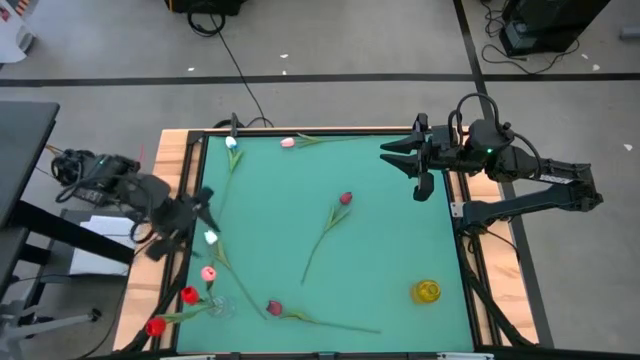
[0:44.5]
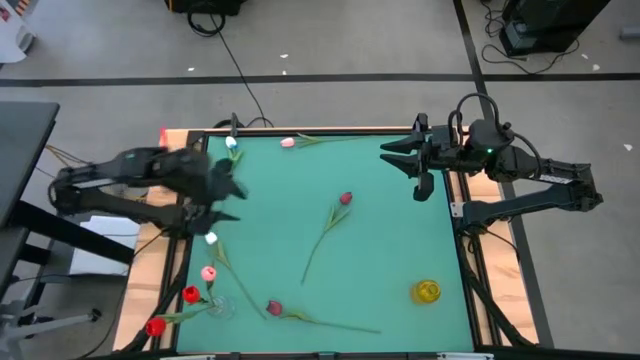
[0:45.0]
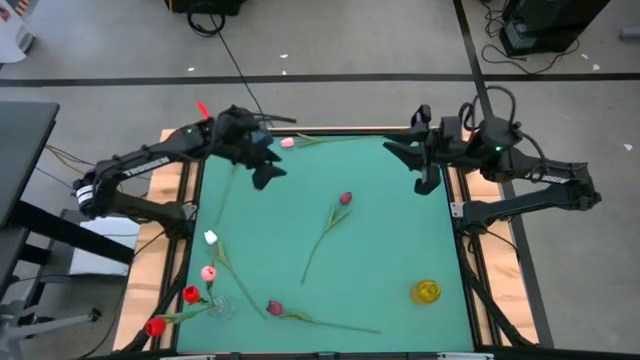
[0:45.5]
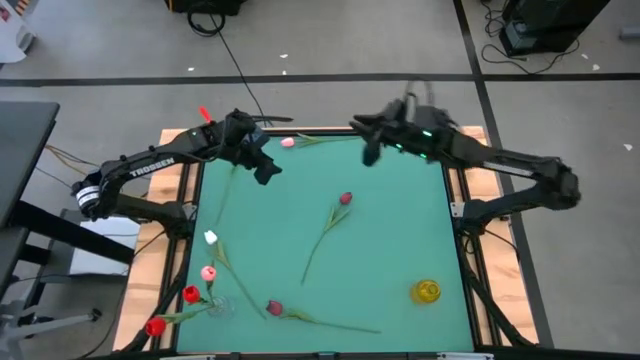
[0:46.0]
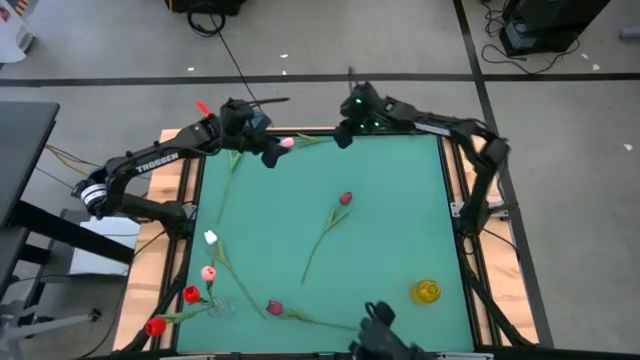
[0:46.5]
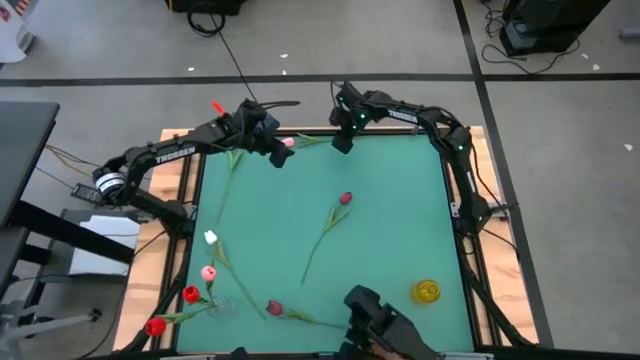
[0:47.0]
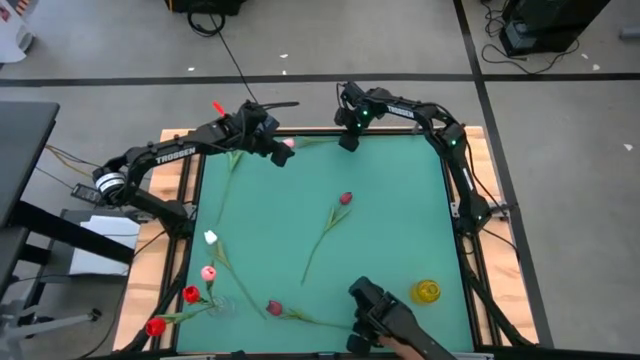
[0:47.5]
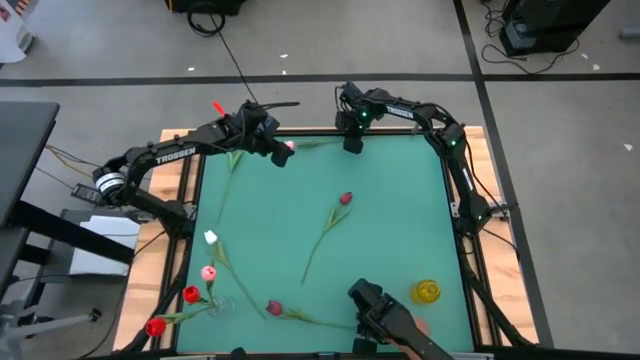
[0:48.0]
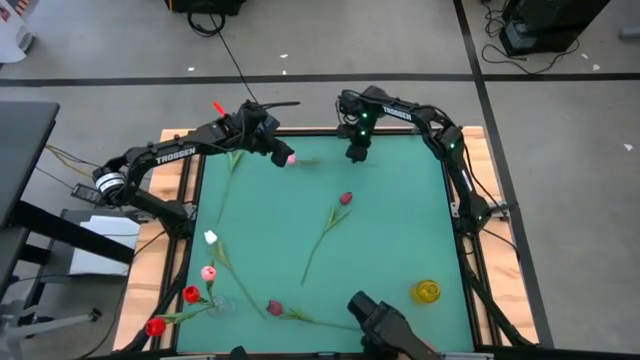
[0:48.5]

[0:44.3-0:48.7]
Task: Sort flowers into vase by color
Put the pink tulip into the white transparent vase

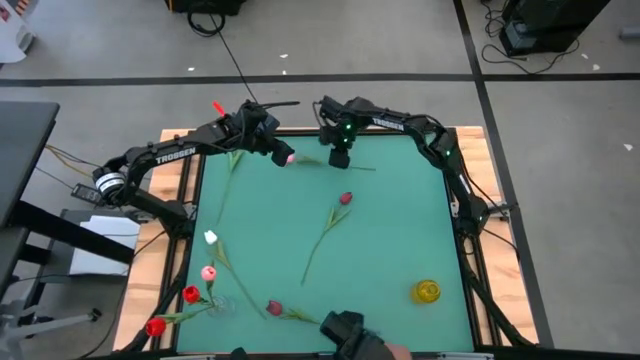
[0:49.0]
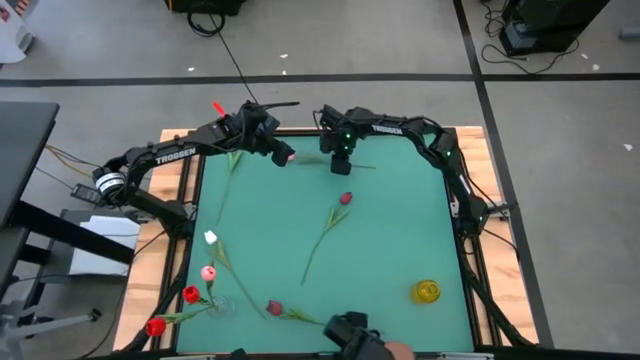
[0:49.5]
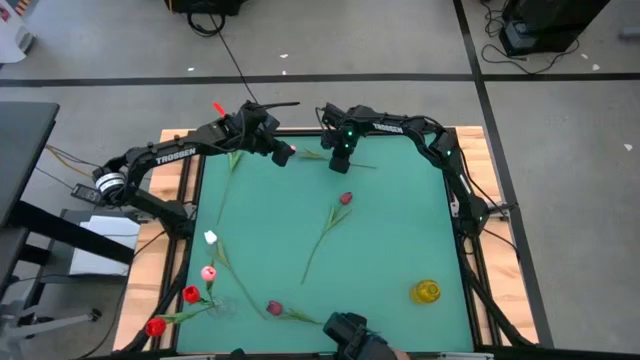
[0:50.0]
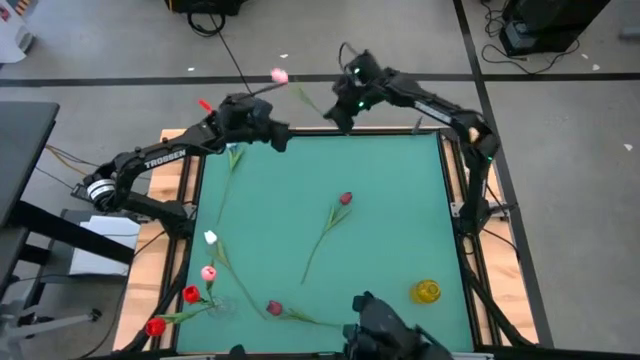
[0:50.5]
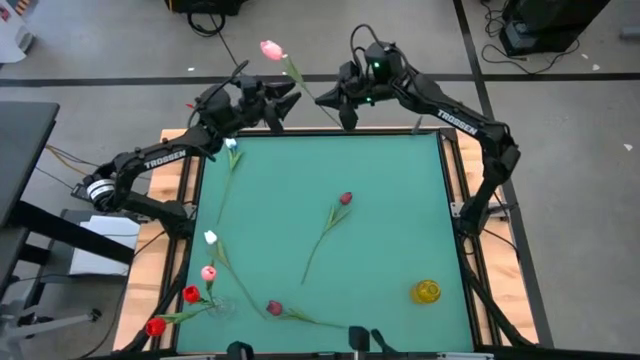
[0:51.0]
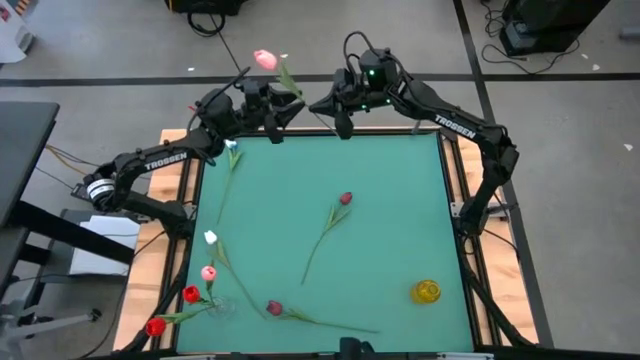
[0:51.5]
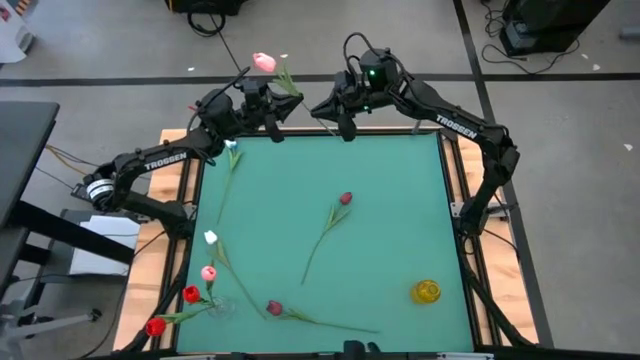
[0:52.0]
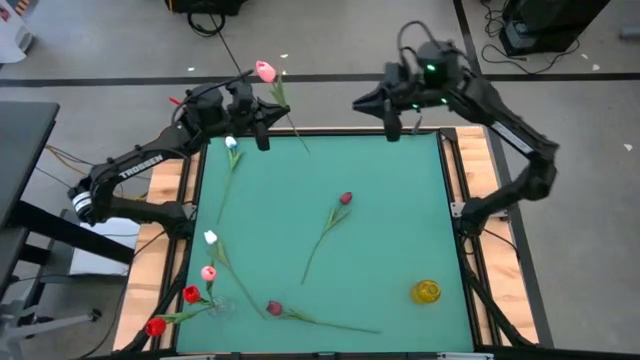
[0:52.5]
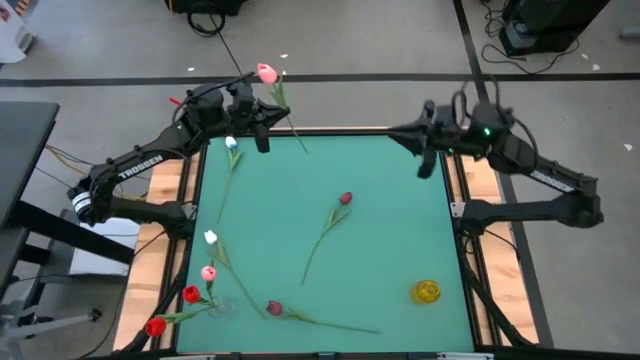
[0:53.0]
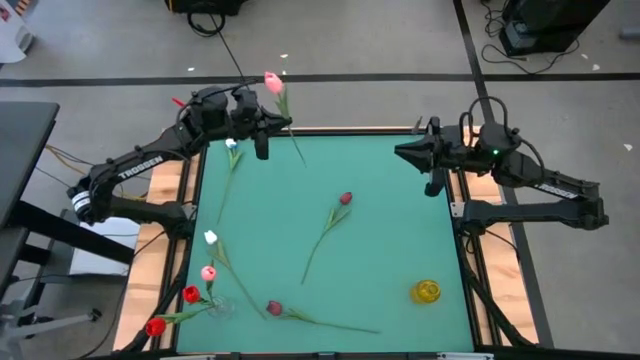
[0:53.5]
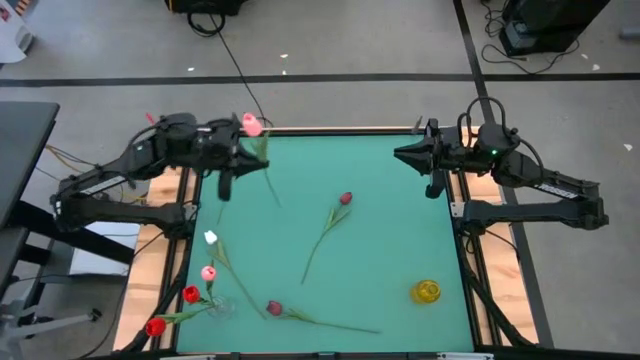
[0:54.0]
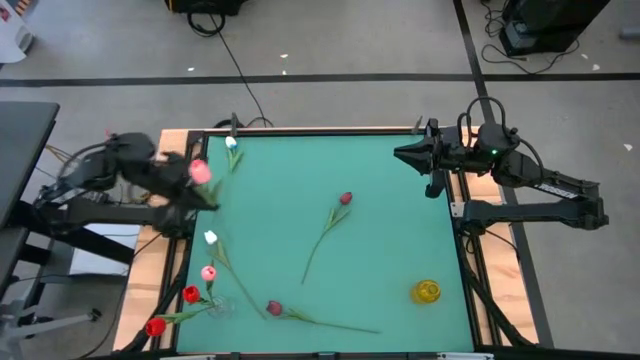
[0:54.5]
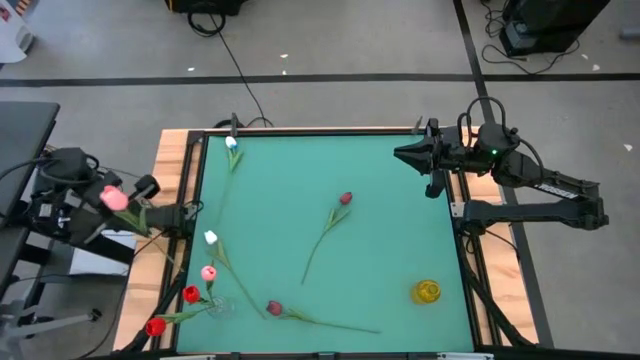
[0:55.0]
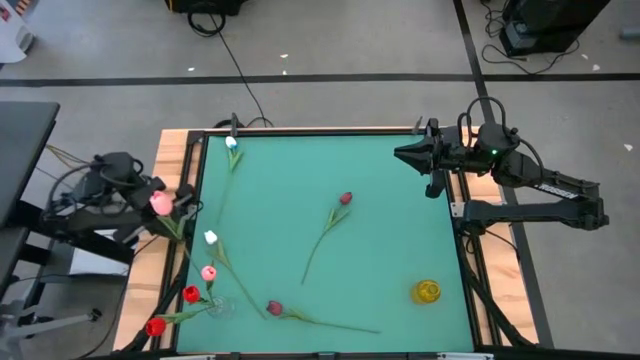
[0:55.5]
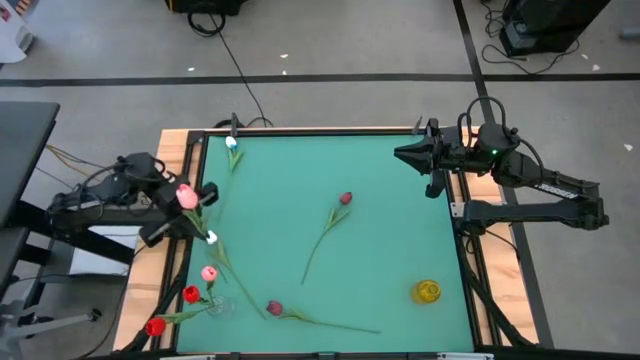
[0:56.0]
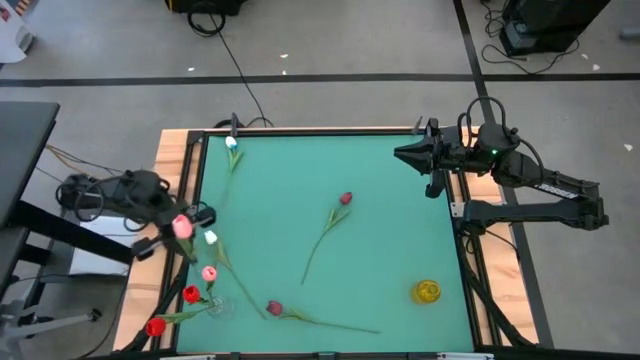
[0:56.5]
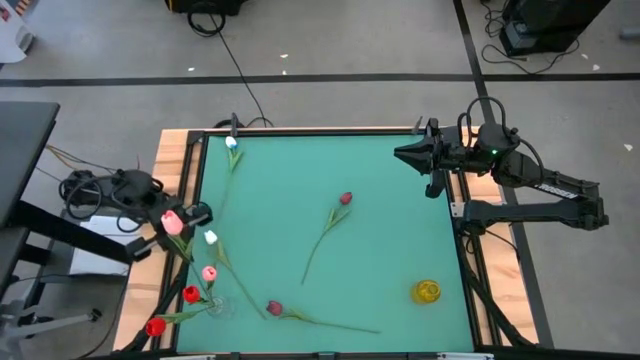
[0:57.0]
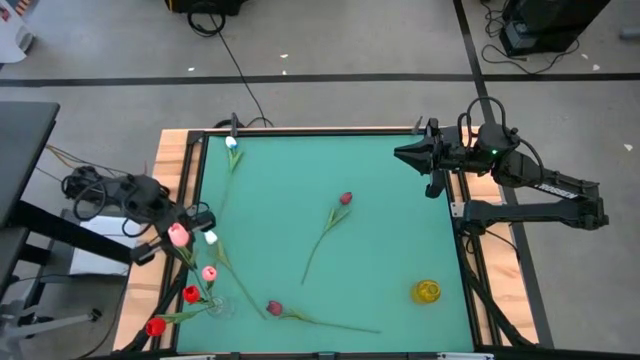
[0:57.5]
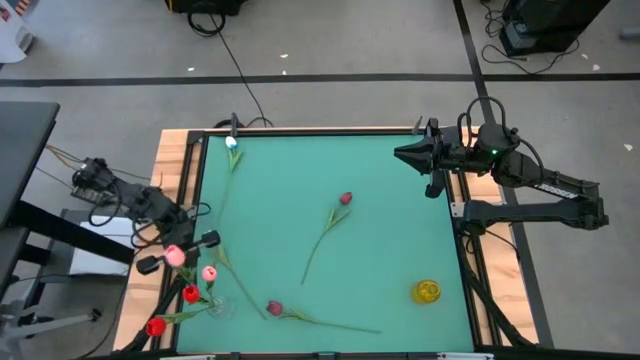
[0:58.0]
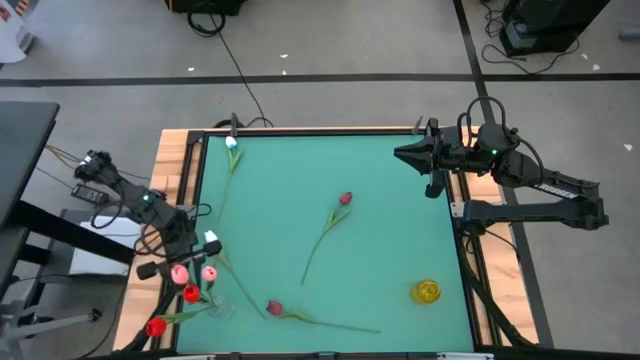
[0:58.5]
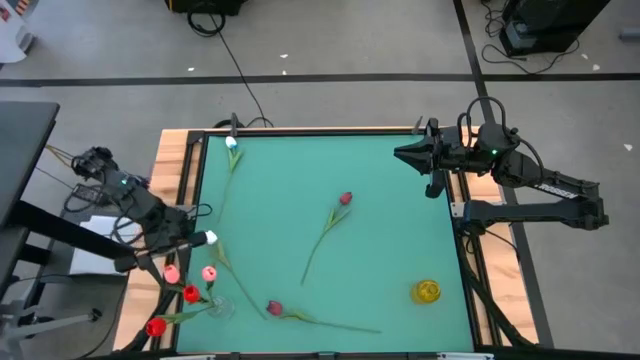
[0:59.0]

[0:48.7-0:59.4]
Put the pink tulip into the white transparent vase

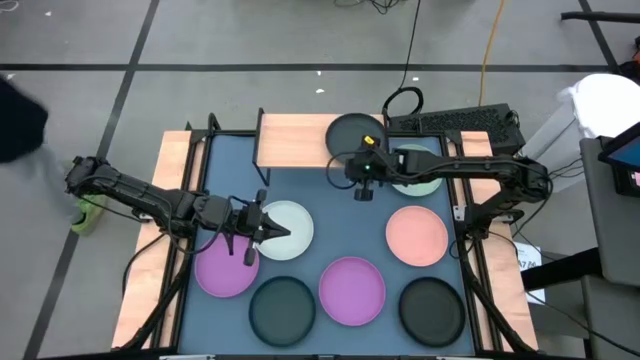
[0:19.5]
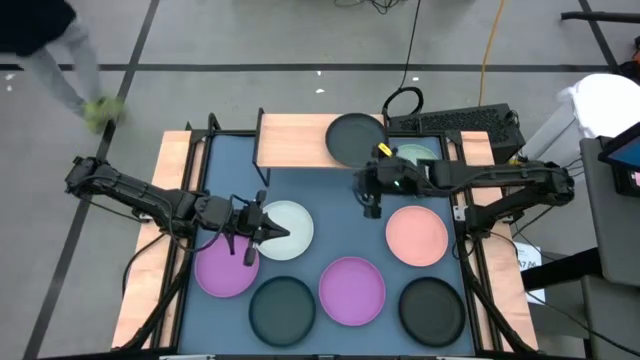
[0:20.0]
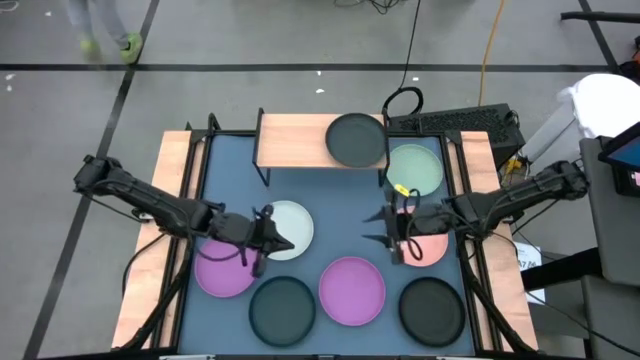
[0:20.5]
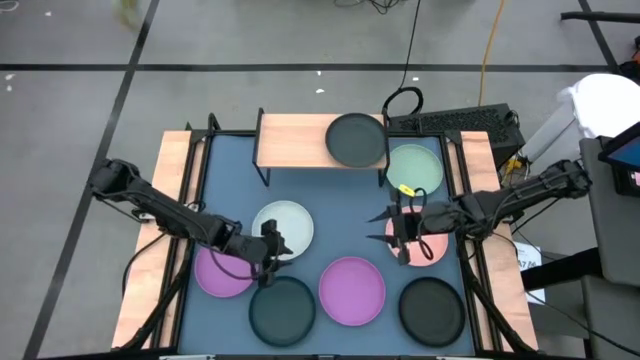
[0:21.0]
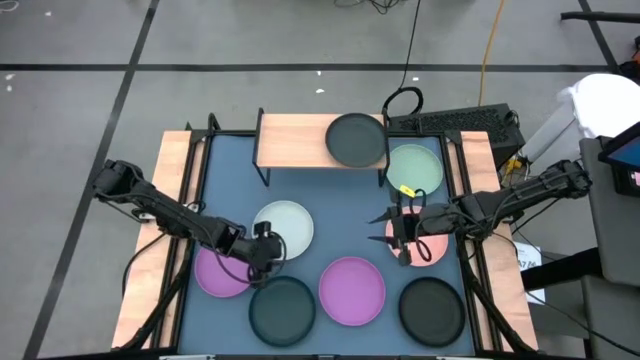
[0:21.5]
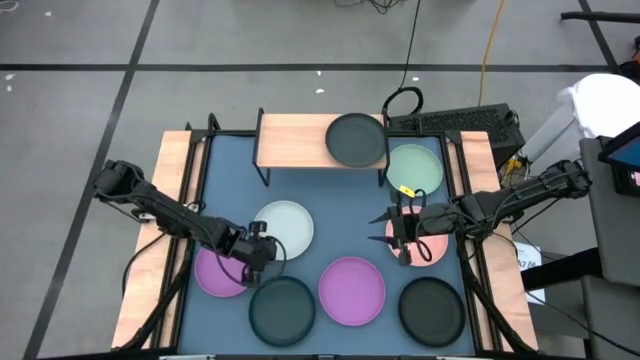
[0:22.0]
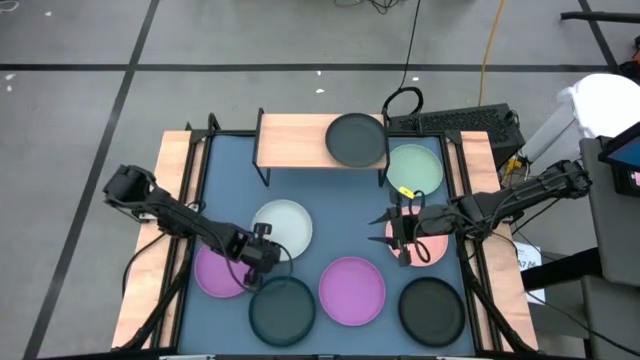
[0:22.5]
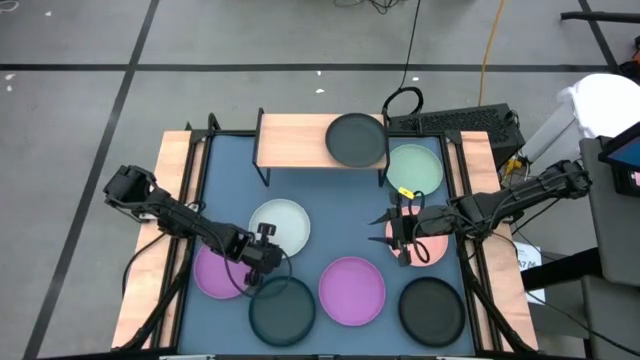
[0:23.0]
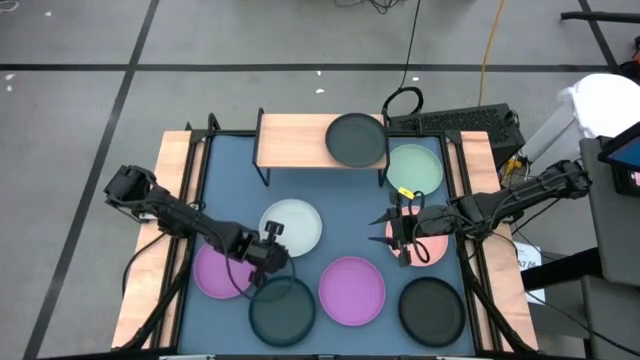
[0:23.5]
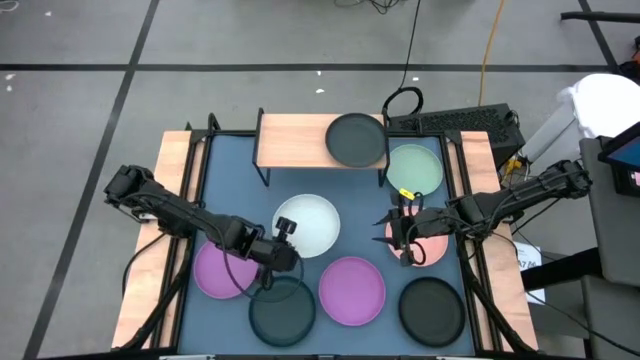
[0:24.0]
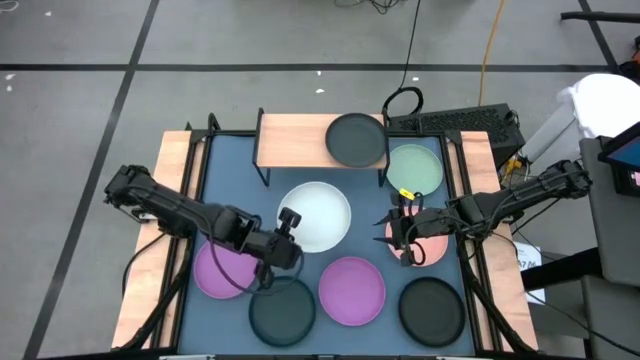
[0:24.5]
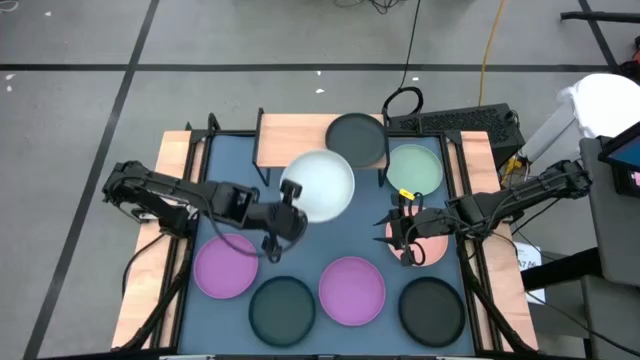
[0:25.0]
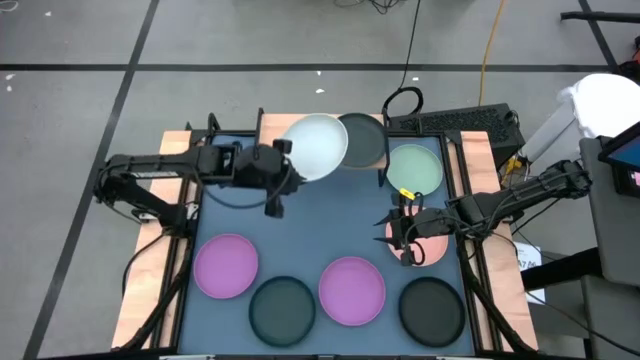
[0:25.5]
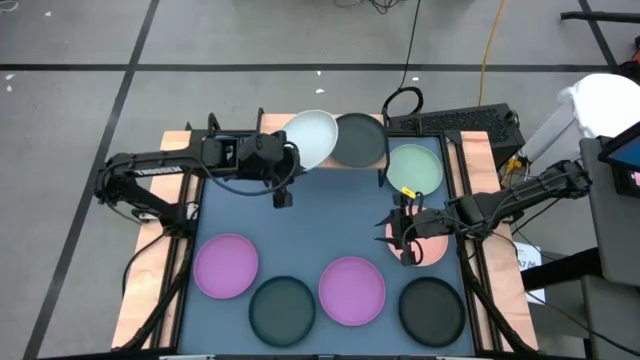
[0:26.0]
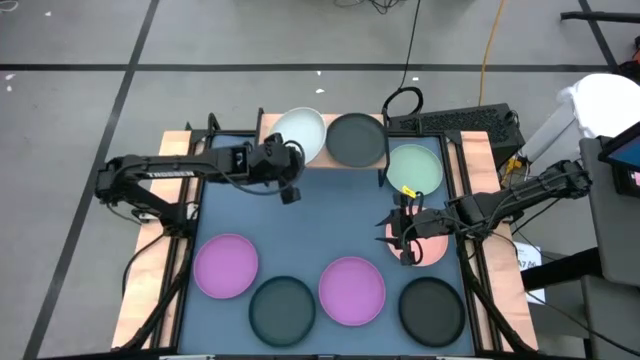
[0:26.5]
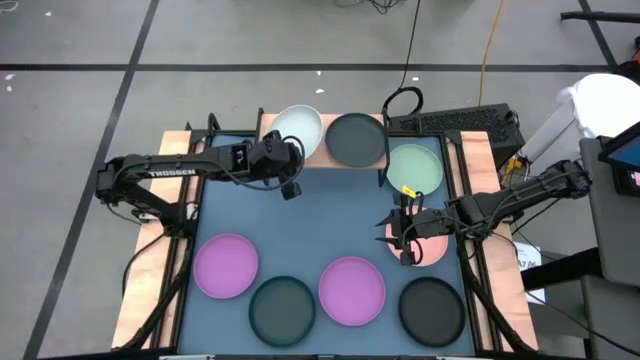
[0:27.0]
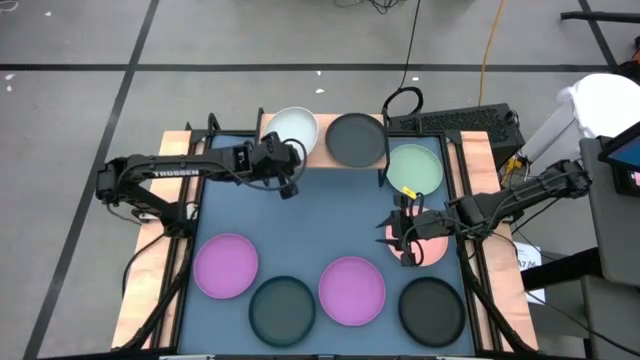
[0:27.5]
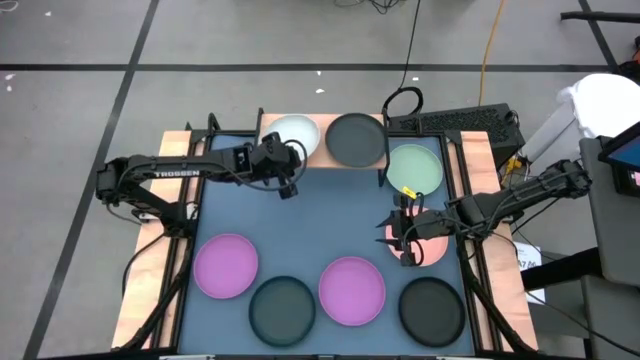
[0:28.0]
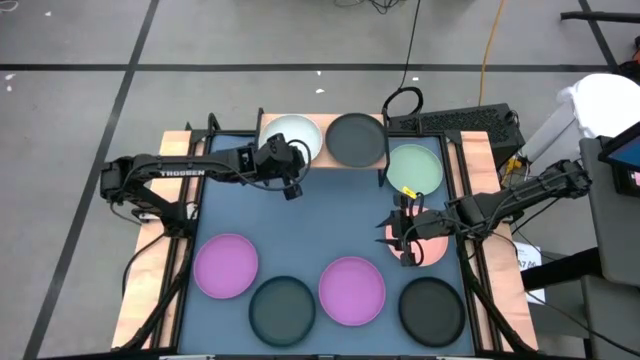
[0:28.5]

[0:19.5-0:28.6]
Task: Place and stack plates onto a shelf
Put the blue plate on the shelf
